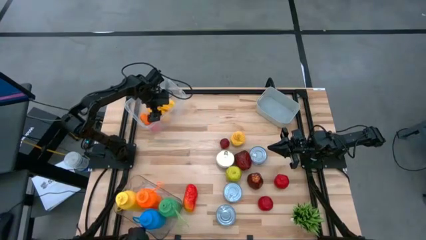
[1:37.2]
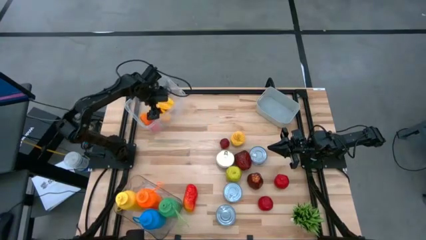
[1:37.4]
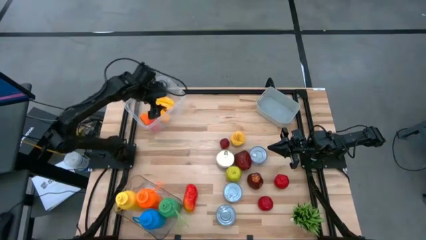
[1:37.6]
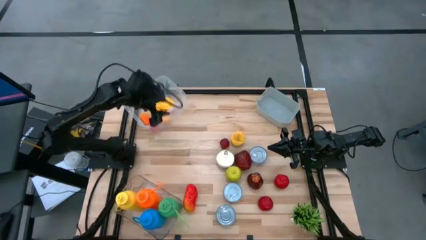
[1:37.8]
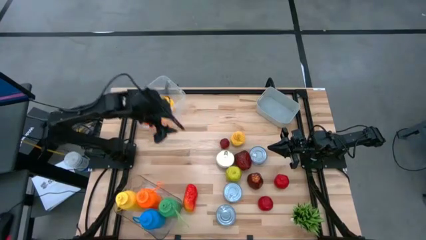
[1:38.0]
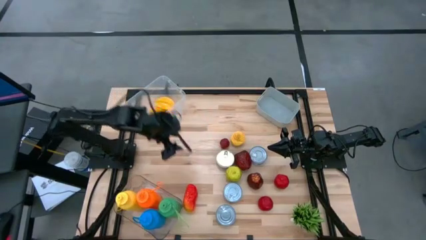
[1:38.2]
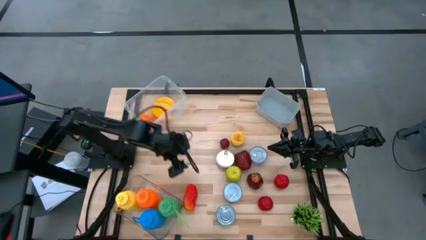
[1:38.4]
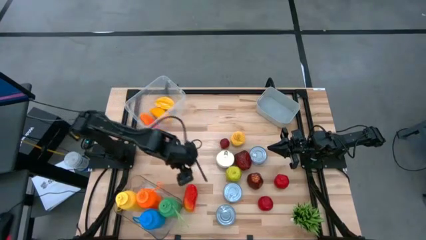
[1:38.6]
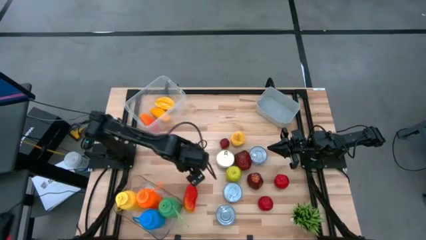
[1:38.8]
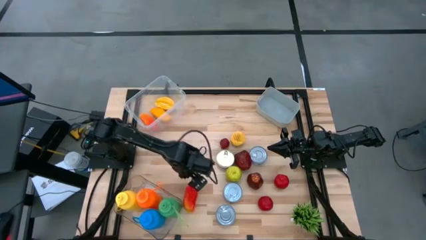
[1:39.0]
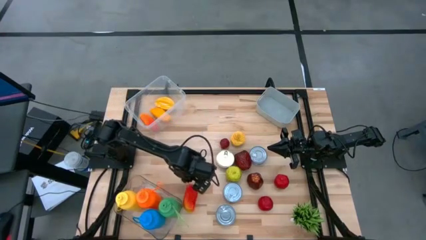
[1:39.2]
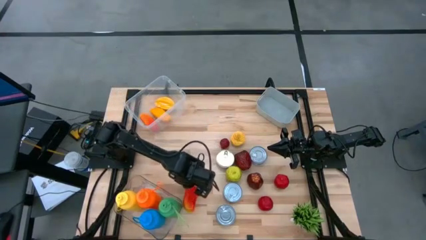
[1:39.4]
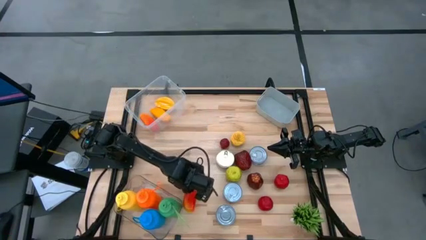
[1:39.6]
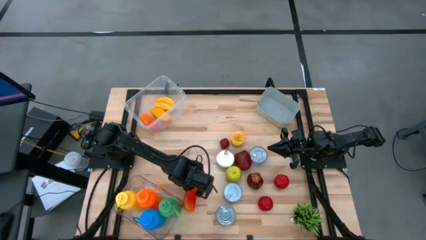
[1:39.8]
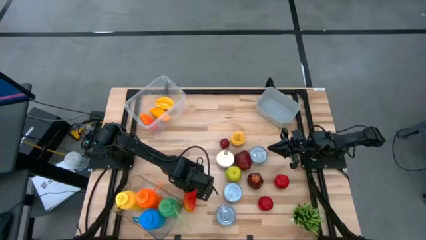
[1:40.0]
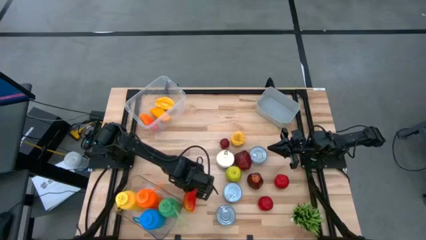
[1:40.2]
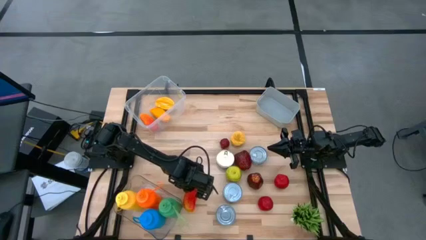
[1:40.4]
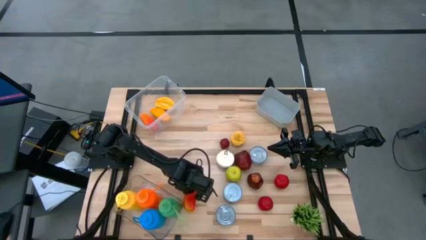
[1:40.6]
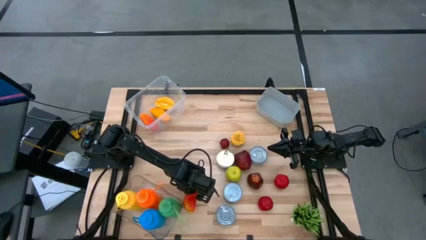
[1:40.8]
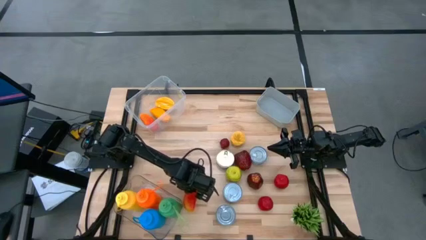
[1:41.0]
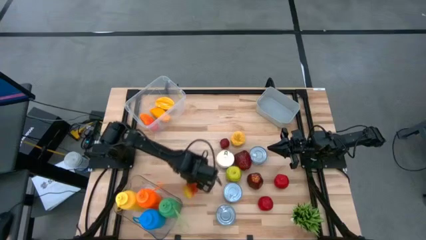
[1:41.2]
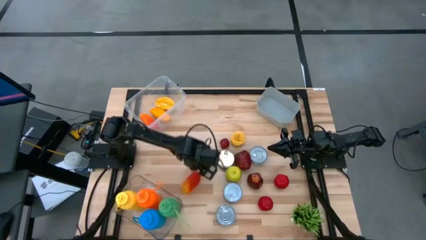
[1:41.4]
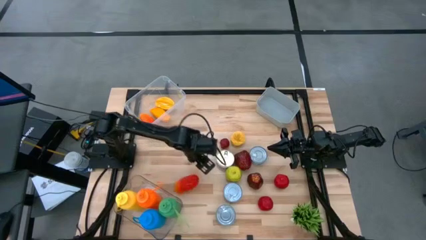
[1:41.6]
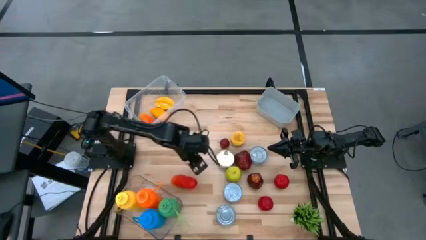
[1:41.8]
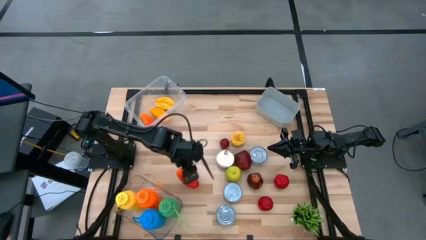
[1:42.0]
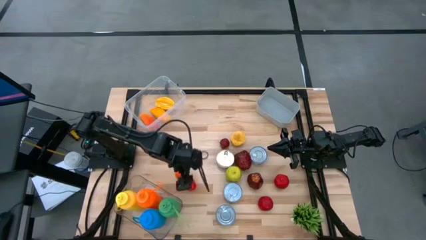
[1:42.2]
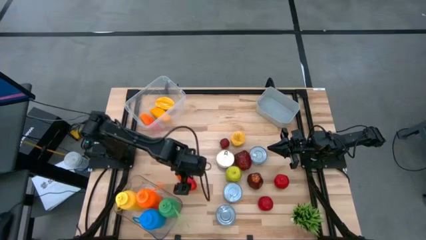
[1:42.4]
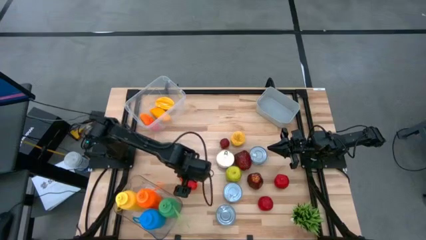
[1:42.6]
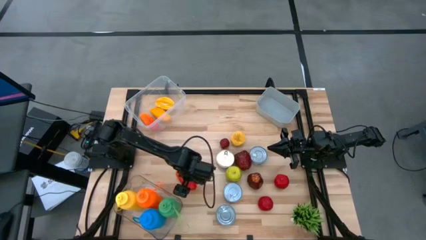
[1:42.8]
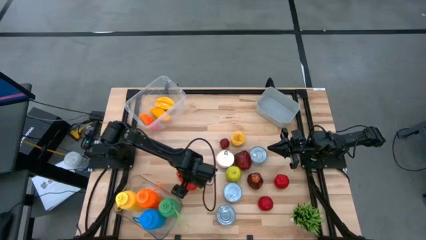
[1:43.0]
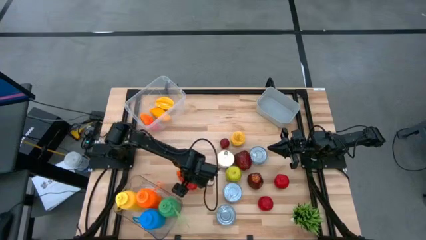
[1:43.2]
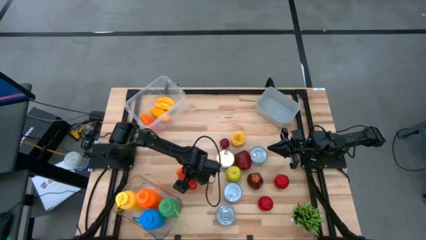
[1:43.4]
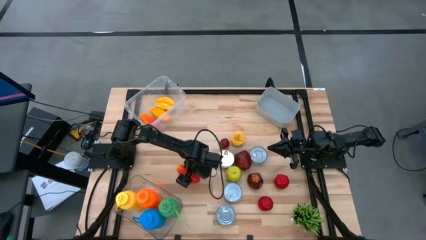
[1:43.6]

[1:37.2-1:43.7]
Task: Pick & Place Food Item
Put the red mango into the white bin

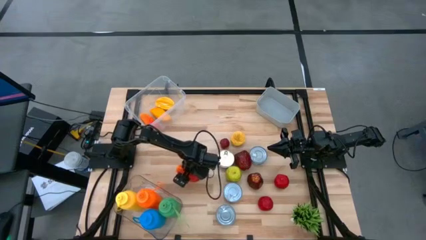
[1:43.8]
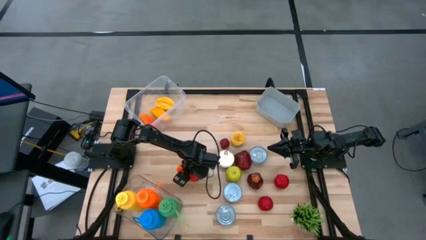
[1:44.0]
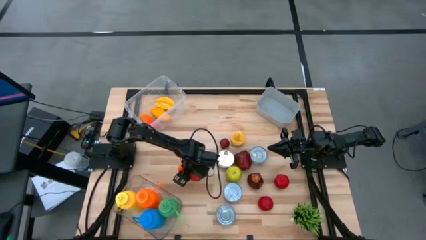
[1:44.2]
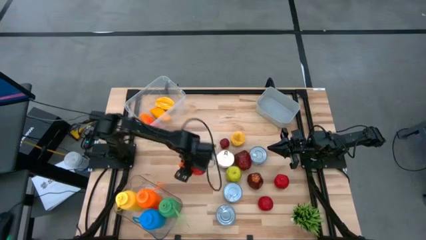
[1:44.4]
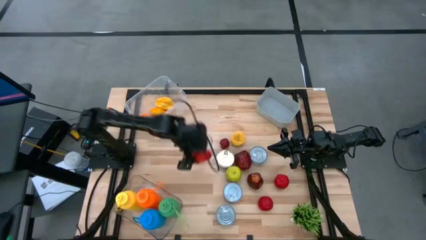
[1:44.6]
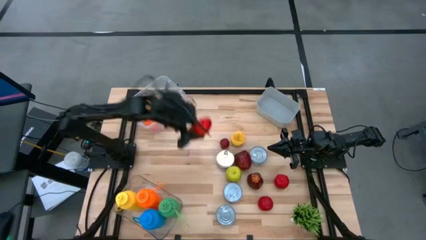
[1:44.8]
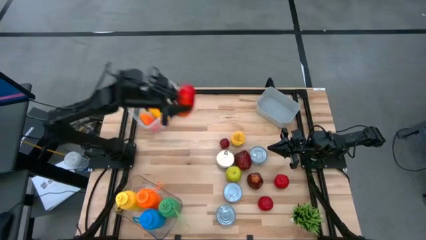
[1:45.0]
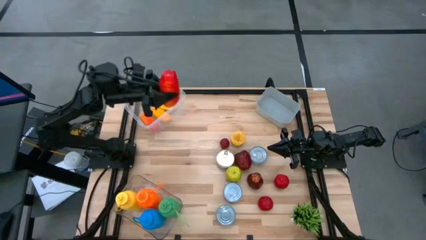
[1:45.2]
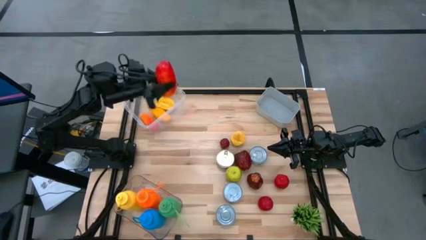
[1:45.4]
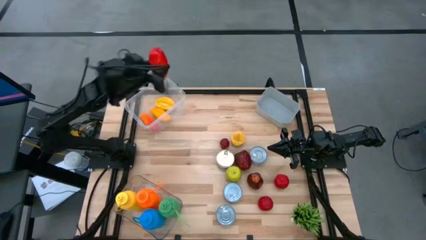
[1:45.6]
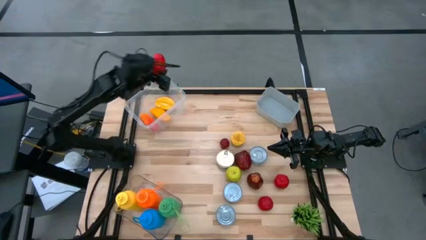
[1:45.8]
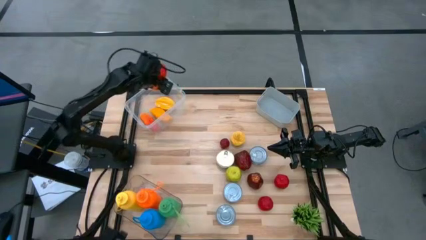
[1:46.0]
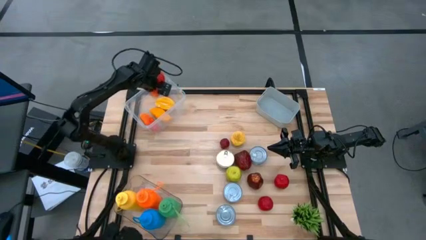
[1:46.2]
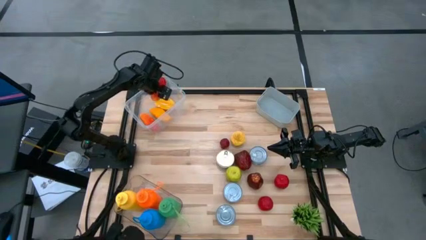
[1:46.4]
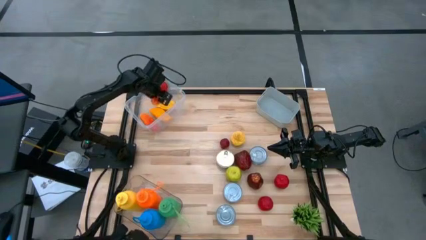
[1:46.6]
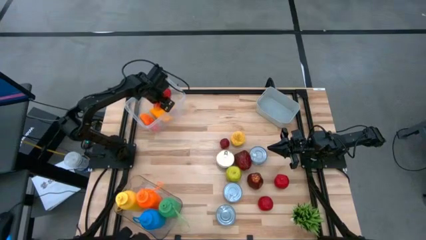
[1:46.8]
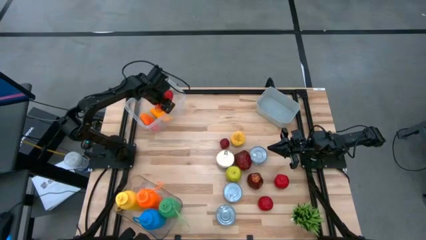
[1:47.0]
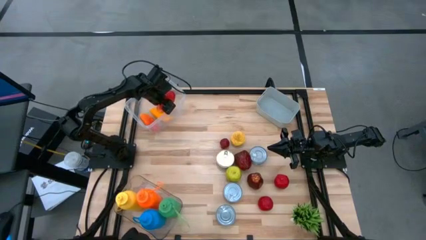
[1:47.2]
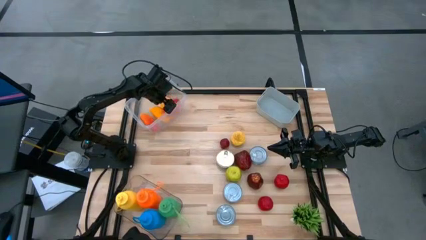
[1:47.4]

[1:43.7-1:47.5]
Put the red mango into the white bin

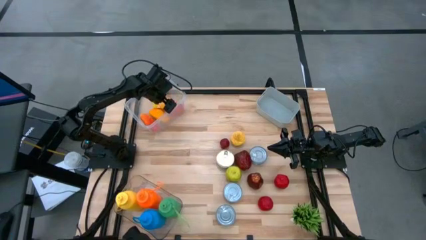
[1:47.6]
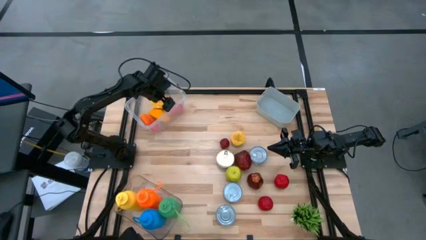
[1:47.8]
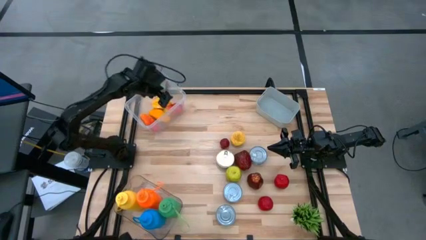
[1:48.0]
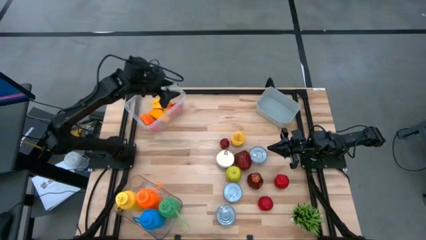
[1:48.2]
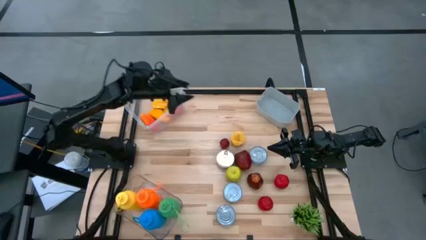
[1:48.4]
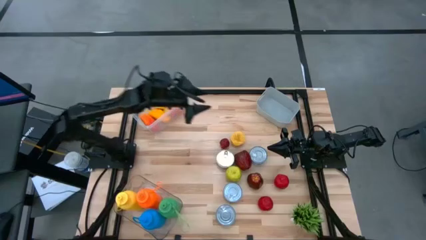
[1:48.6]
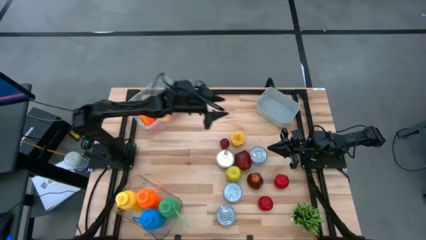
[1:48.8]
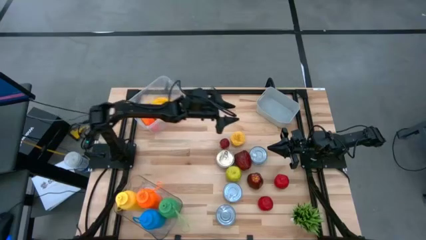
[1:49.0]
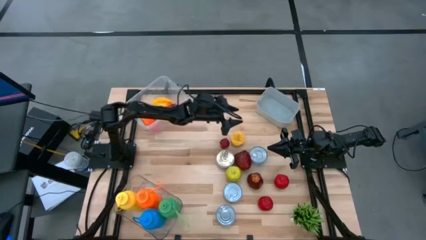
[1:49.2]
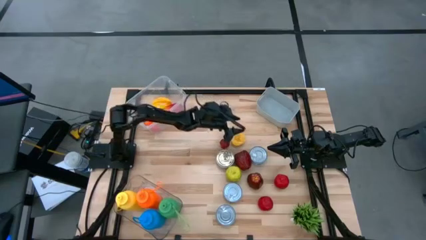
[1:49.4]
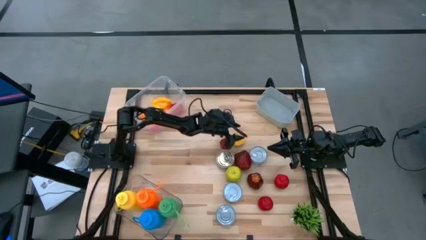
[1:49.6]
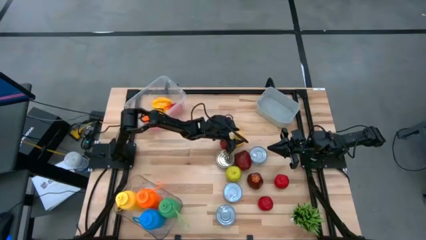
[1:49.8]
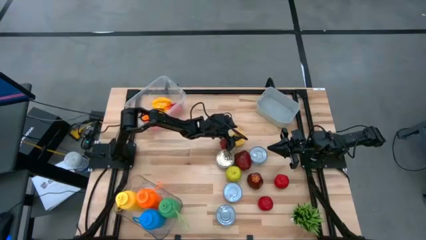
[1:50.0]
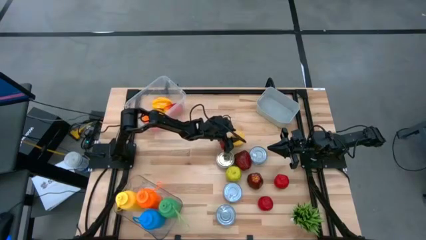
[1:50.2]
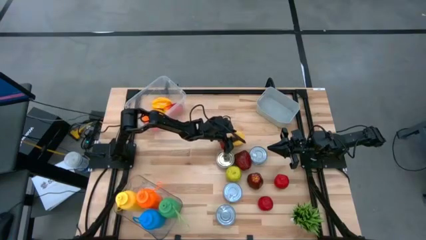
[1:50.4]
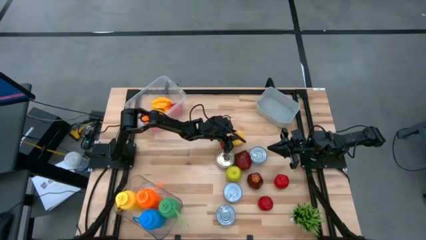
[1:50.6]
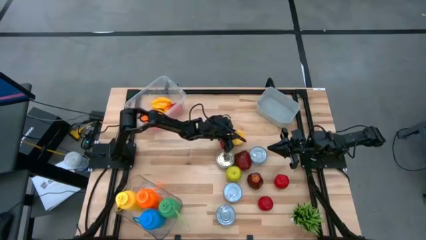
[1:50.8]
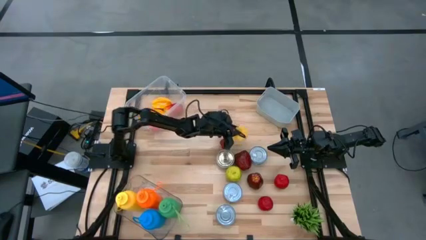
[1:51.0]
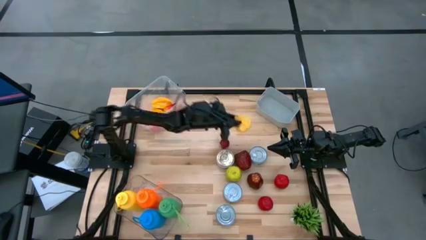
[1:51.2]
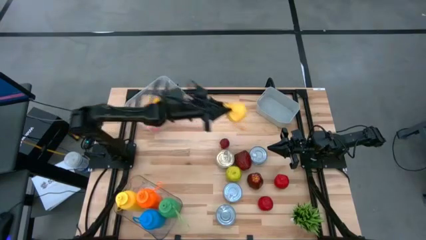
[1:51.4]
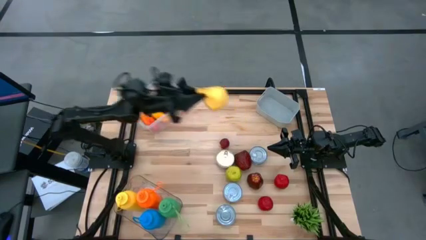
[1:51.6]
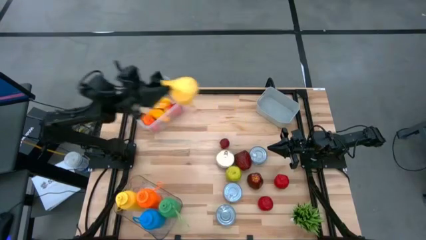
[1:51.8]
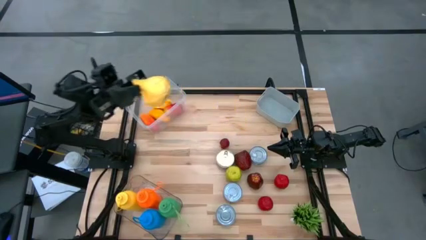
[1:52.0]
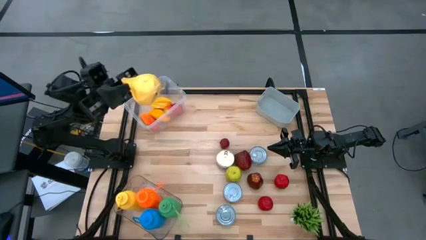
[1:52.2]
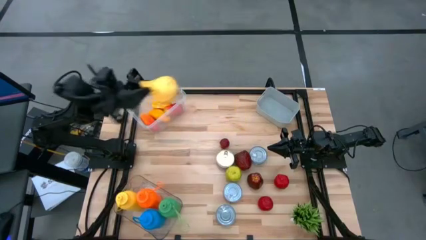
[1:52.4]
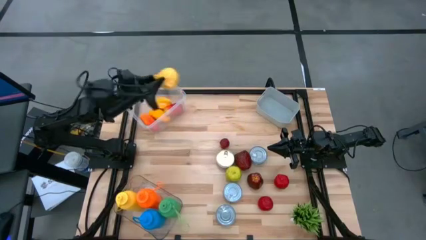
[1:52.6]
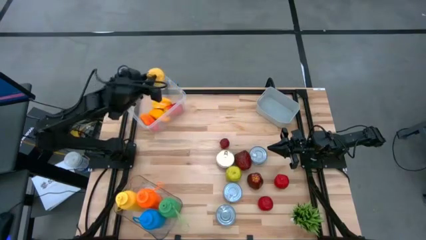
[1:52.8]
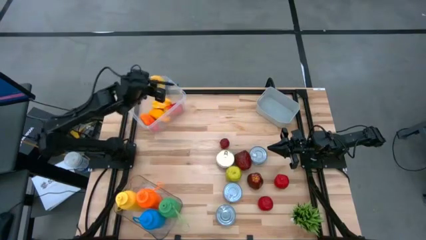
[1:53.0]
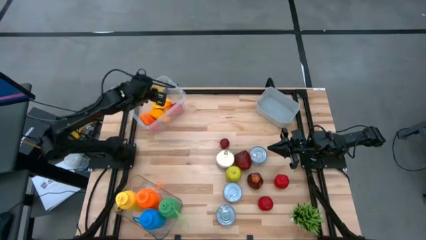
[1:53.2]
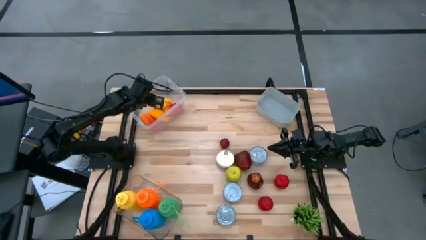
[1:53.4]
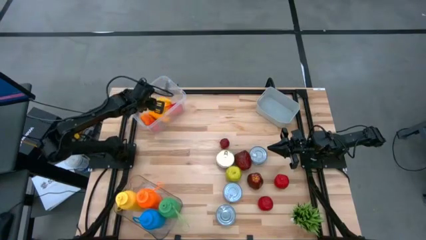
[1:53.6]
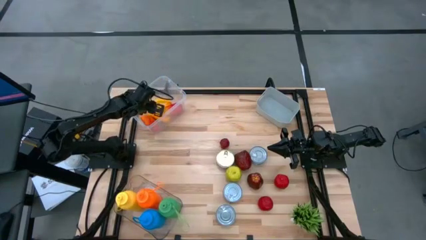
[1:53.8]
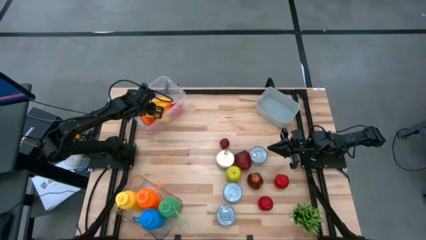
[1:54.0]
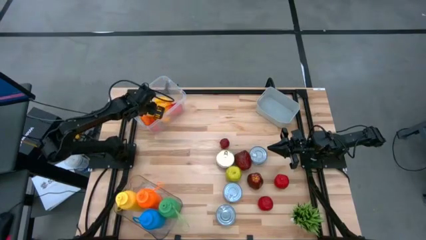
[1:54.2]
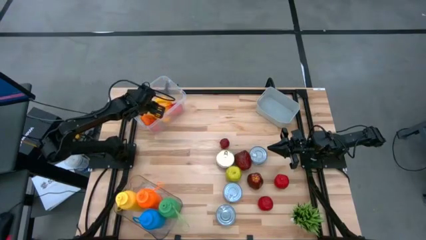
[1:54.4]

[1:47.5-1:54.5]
Put the pear into the white bin
